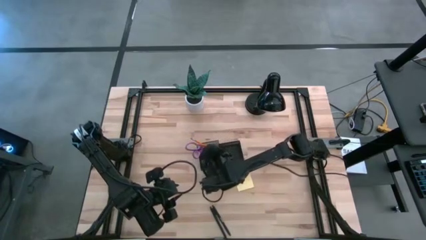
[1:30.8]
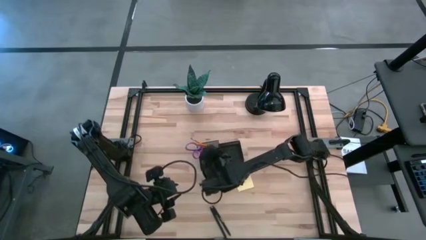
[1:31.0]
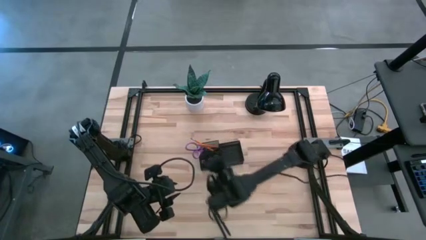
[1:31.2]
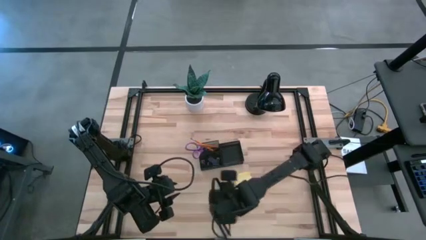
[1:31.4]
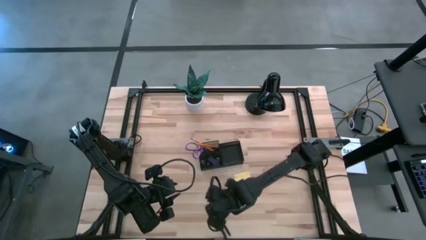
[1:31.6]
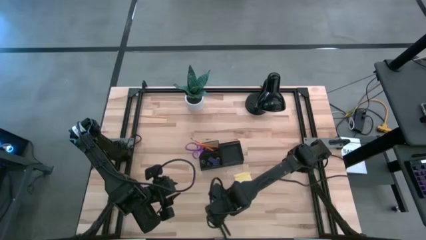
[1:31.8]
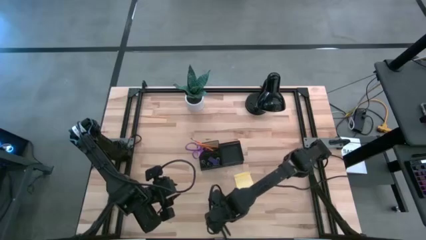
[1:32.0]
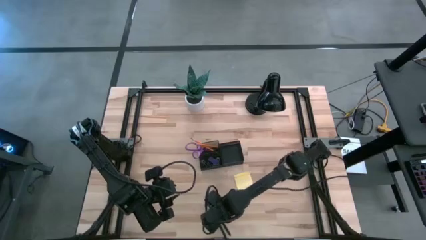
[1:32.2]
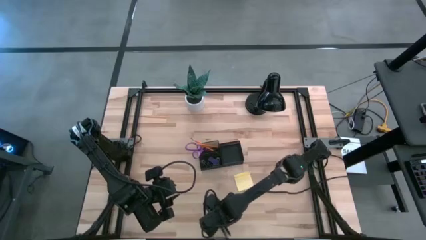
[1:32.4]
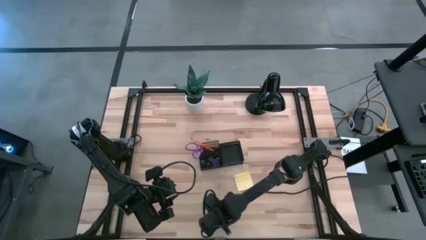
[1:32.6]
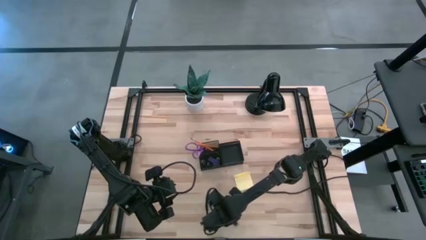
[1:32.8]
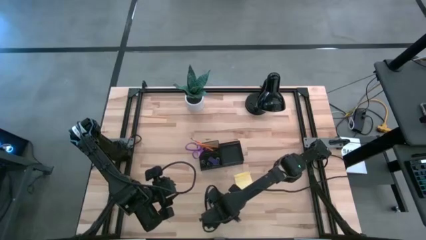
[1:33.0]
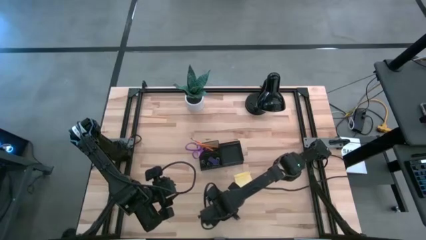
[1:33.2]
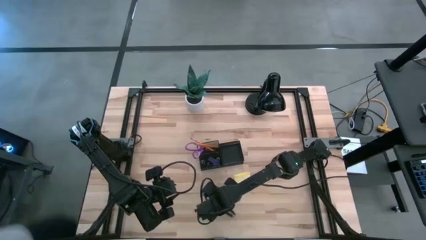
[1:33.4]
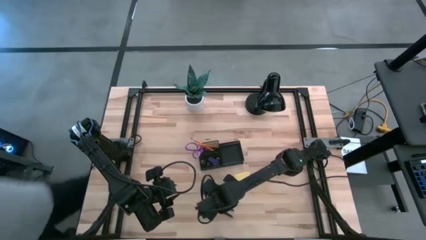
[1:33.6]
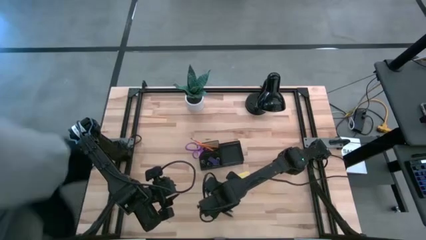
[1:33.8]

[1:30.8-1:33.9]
Task: Pick and place office supplies into organizer
Put the right pen into the desk organizer

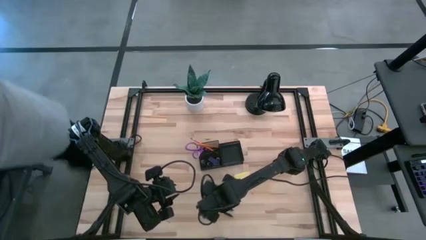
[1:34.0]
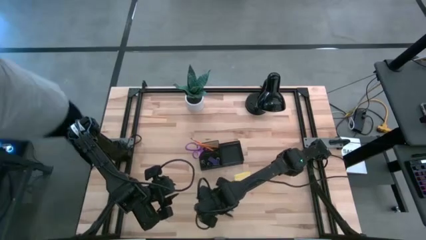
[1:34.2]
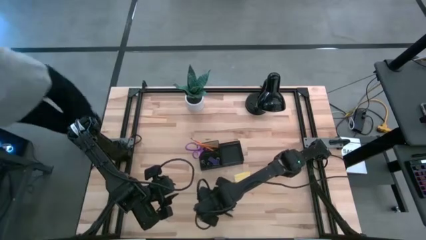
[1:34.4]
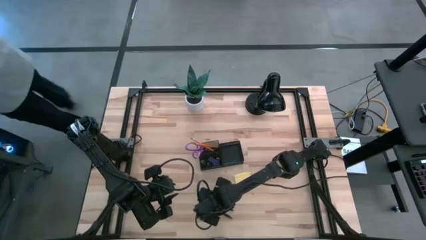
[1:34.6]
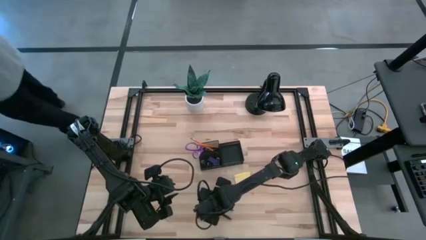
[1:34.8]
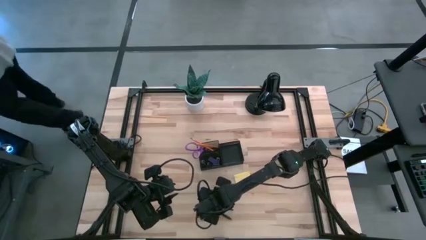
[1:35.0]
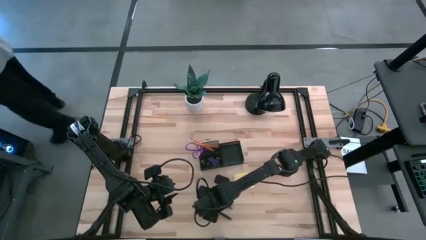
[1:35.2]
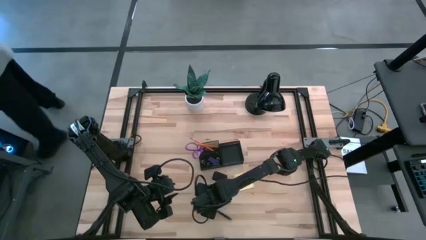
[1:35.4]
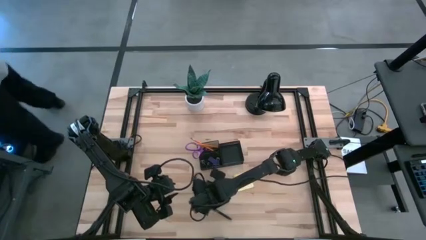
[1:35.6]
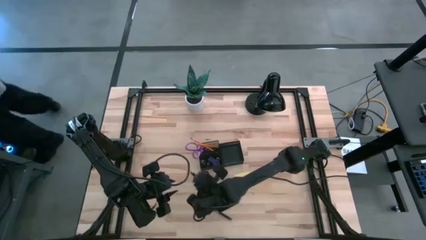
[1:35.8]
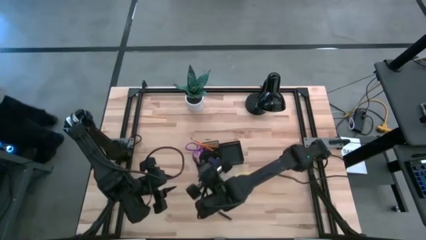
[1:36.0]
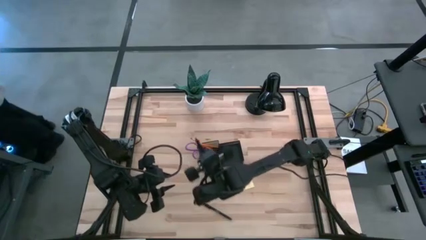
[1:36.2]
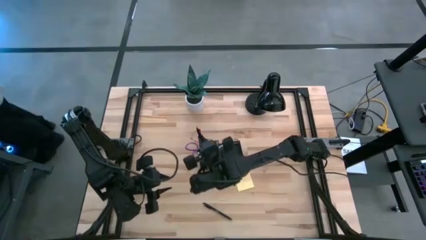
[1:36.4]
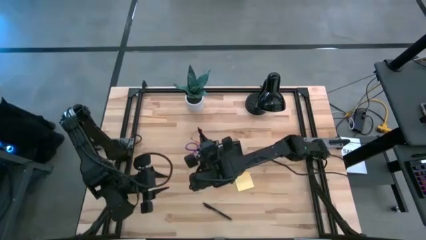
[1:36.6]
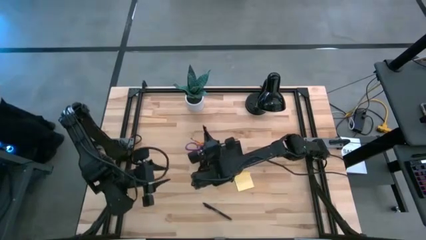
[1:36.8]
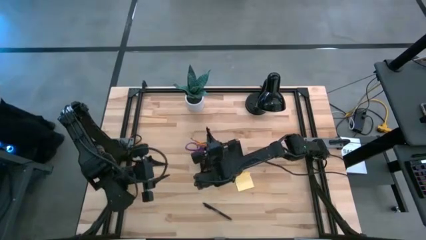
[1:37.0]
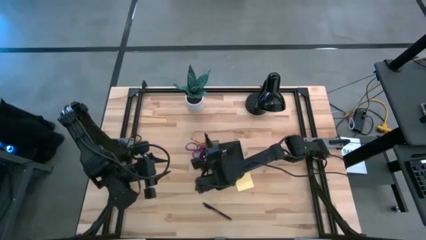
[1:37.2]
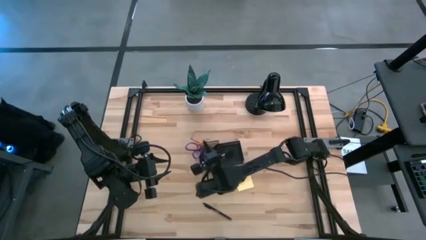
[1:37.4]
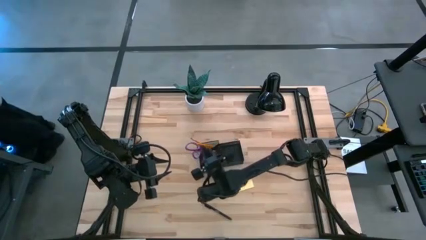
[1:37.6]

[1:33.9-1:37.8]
Put the right pen into the desk organizer

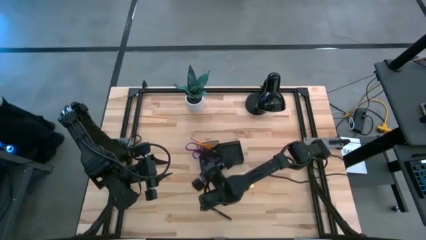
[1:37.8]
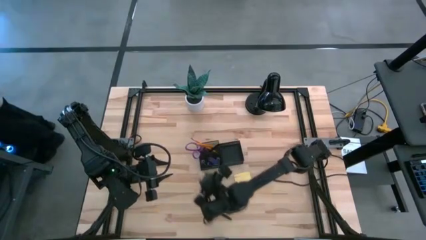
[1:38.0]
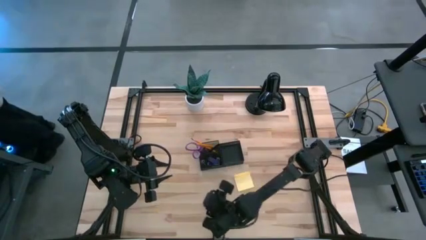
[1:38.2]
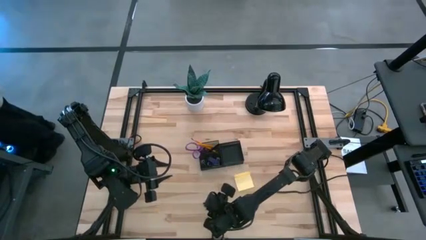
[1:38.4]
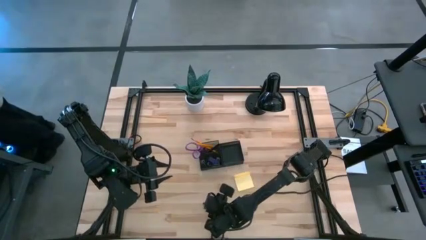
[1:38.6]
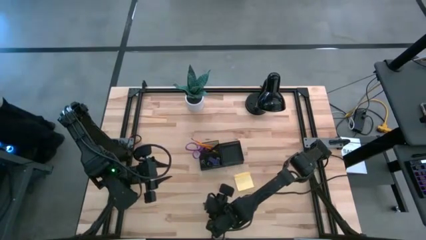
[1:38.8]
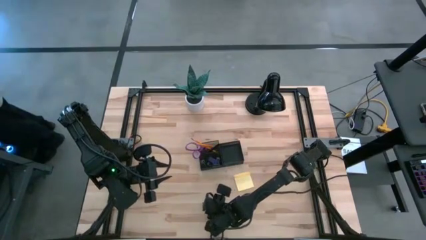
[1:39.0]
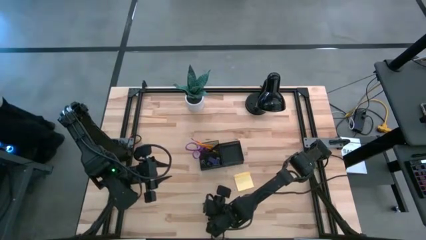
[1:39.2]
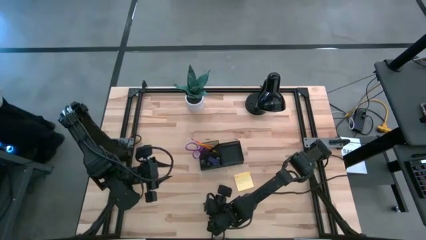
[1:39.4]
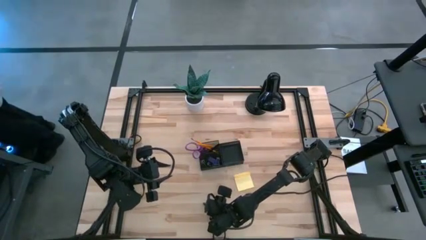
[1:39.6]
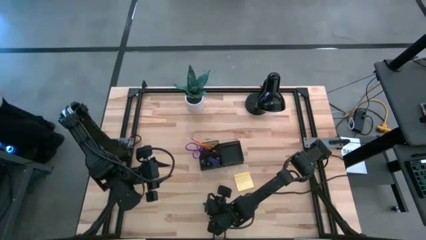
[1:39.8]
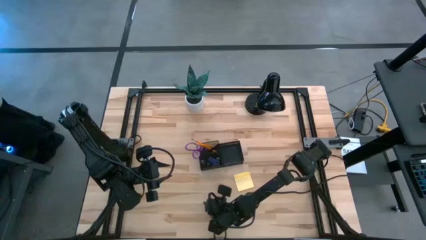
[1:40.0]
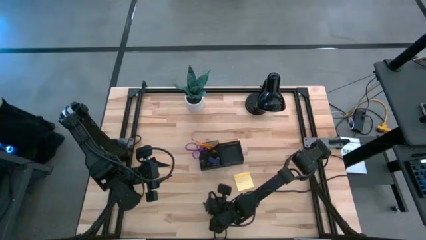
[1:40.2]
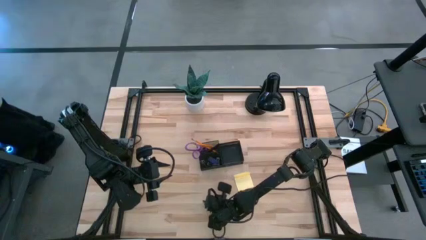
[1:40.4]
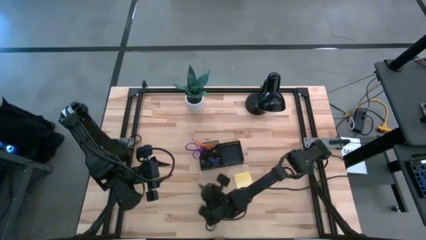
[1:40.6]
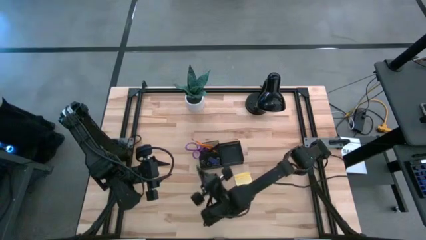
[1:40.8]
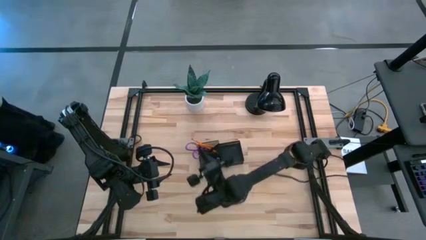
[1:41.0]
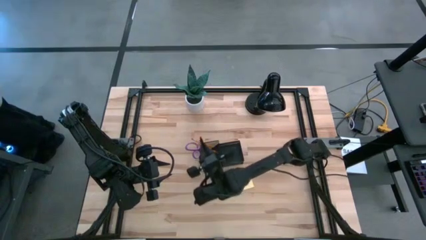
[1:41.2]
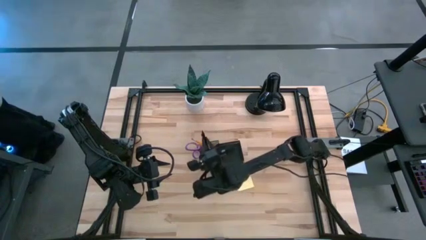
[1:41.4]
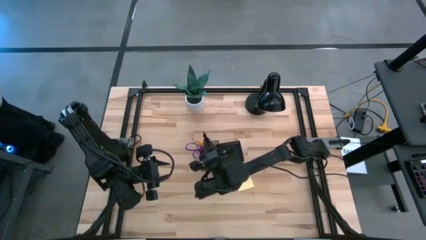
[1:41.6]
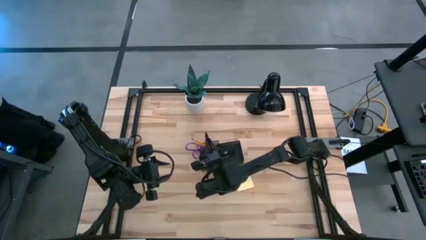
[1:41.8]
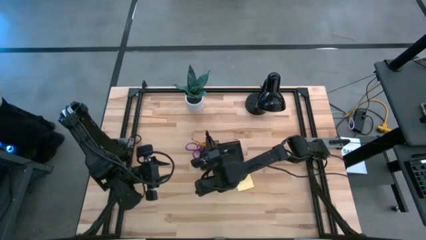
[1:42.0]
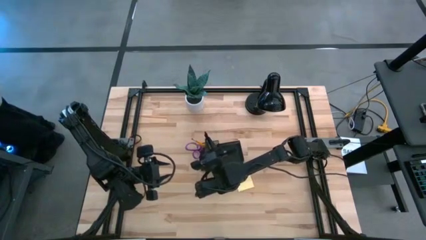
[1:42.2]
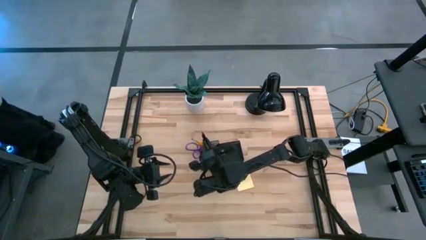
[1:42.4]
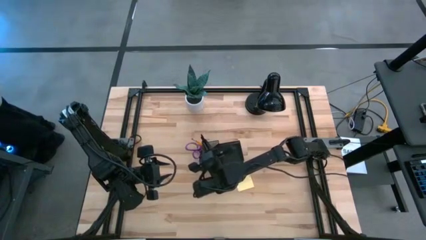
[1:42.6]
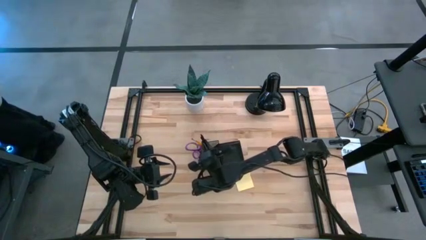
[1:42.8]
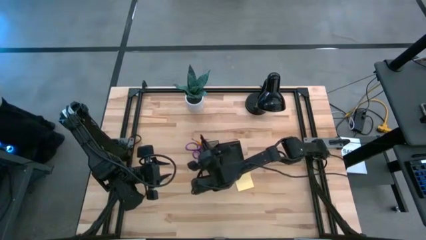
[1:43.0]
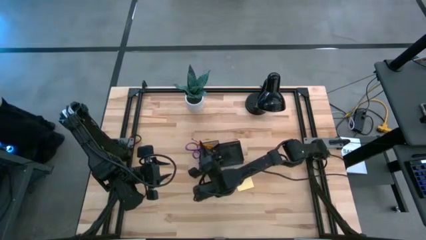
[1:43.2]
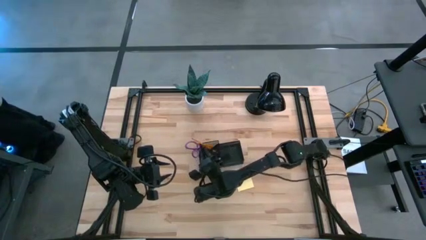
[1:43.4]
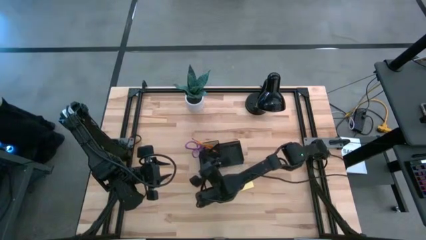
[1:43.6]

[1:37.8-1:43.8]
Put the pen into the desk organizer

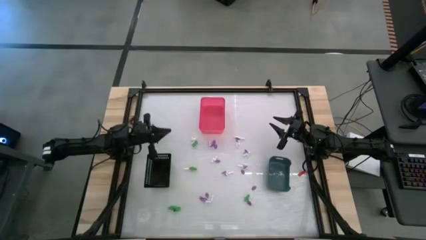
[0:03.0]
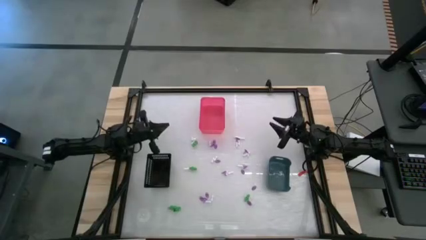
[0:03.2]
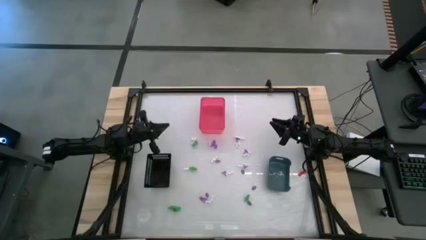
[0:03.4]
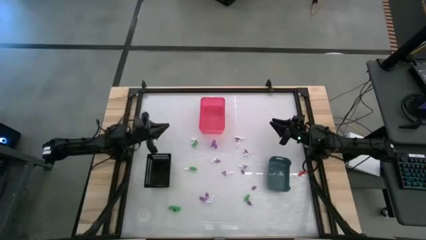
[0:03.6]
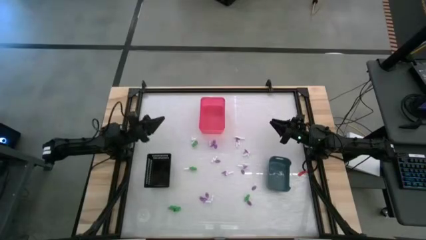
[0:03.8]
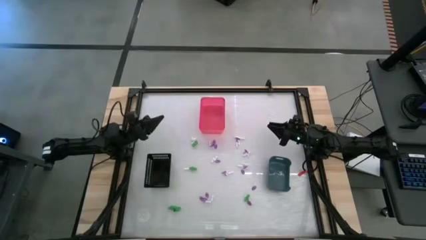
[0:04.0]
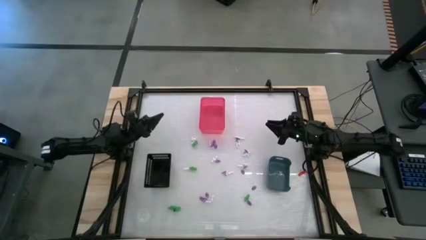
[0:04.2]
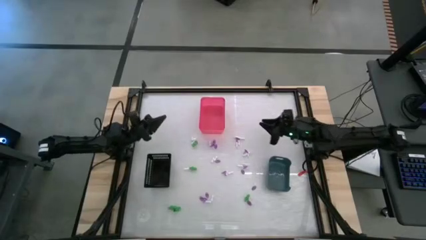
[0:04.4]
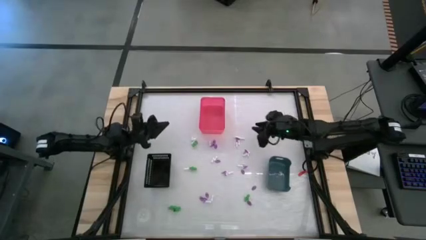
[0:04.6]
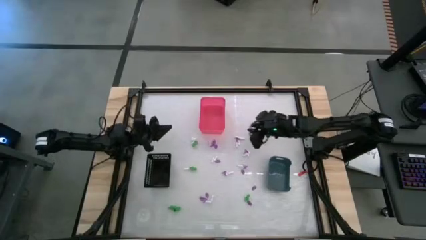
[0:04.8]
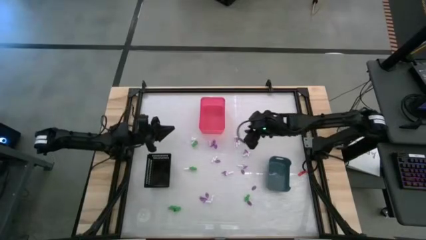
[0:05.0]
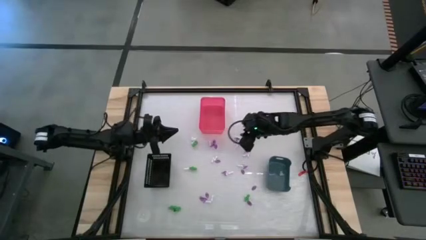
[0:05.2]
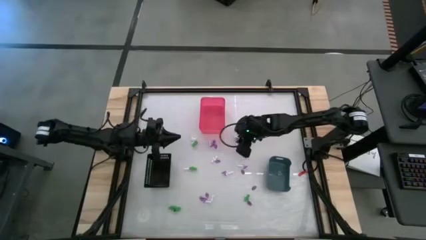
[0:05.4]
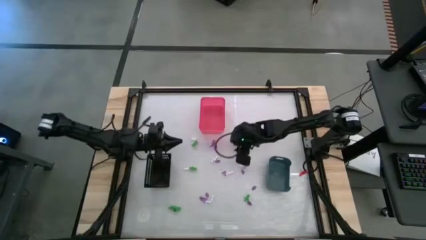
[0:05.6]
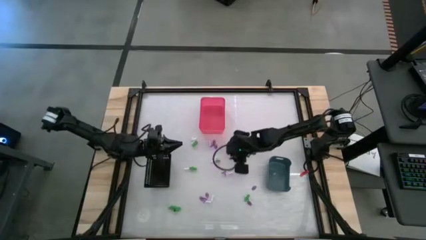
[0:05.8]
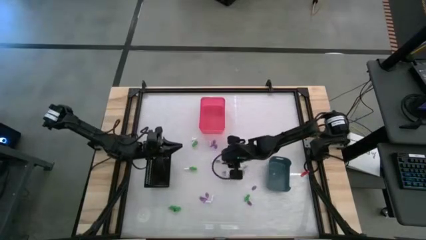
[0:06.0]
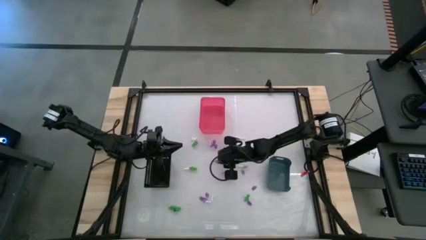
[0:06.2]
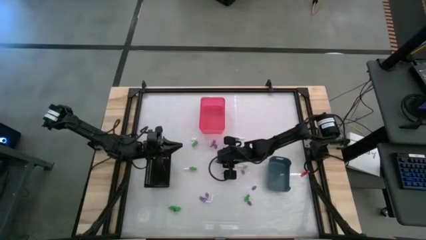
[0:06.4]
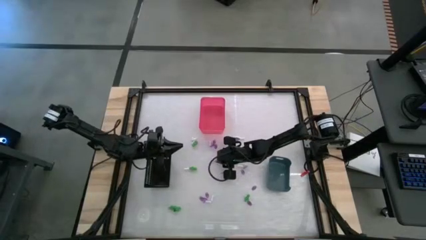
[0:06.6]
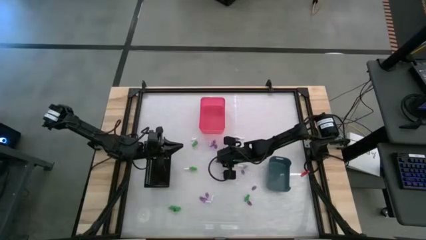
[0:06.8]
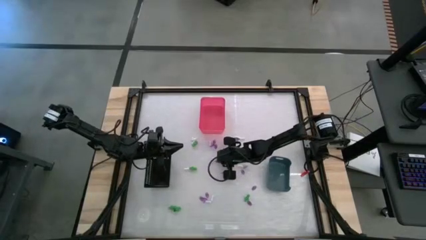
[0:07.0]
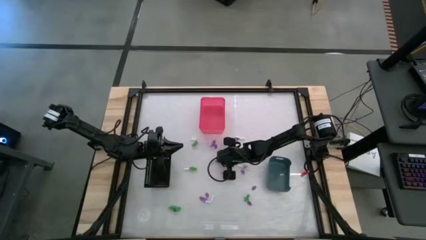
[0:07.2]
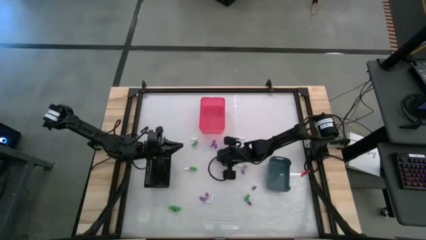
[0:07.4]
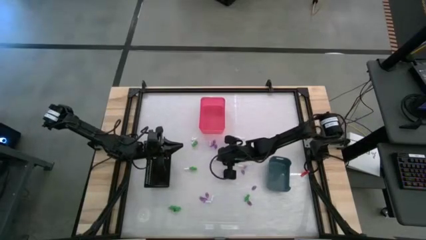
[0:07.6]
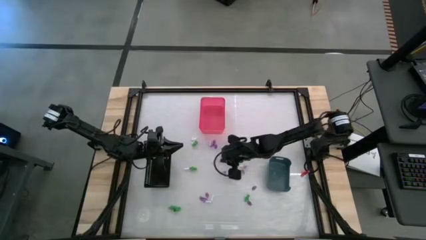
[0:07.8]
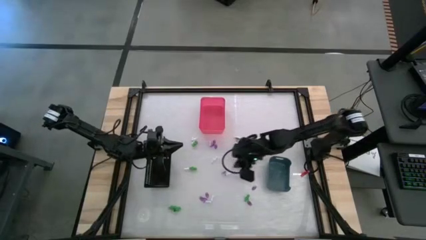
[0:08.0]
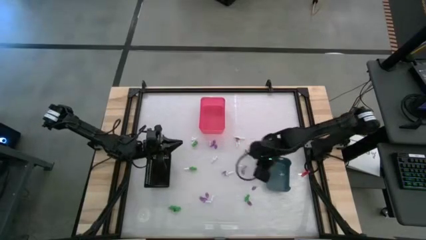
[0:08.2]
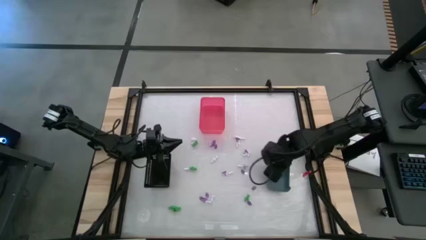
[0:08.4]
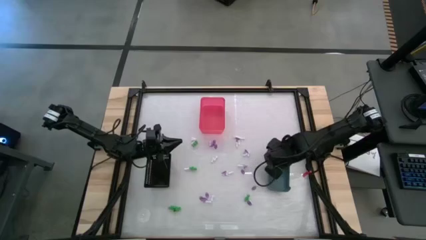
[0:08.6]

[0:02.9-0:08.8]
Task: Sort Halloween decoration
Put the witch hat toy into the blue bin
